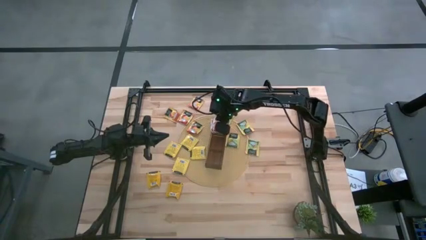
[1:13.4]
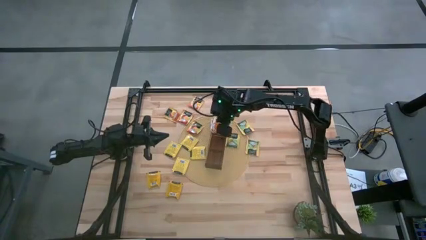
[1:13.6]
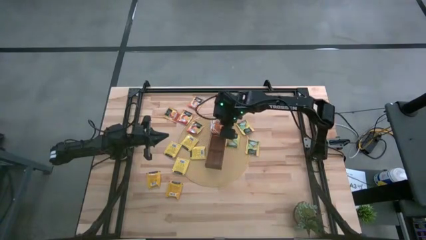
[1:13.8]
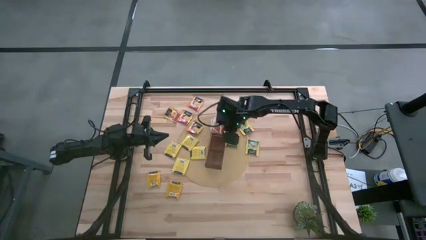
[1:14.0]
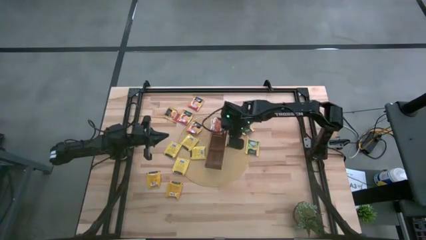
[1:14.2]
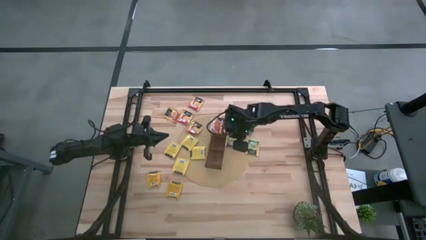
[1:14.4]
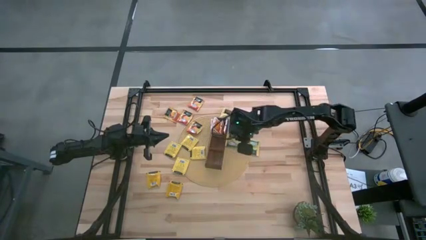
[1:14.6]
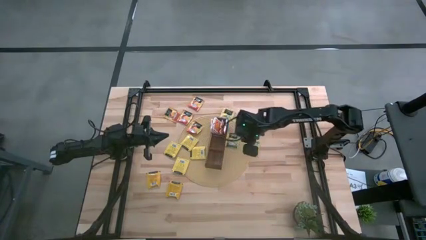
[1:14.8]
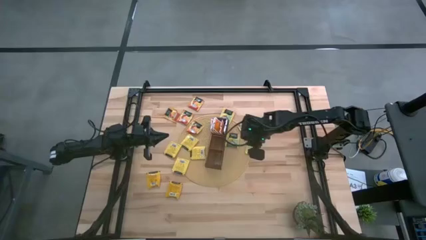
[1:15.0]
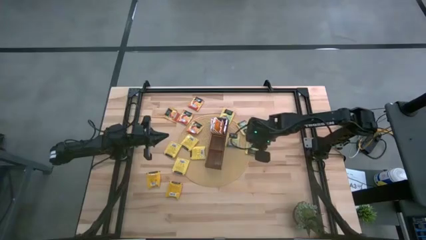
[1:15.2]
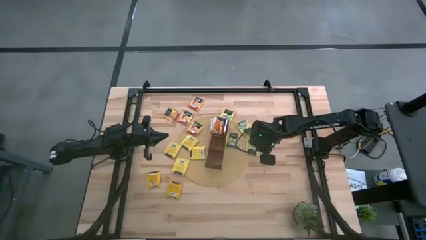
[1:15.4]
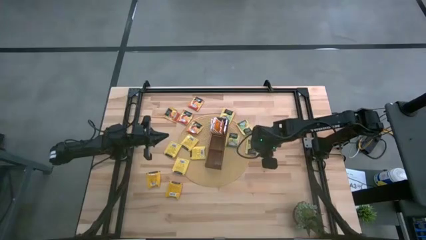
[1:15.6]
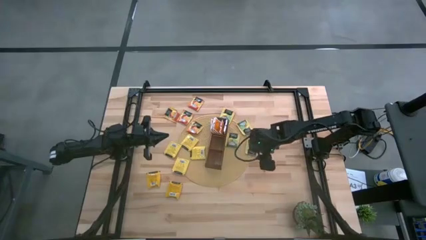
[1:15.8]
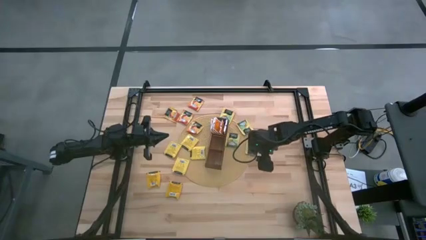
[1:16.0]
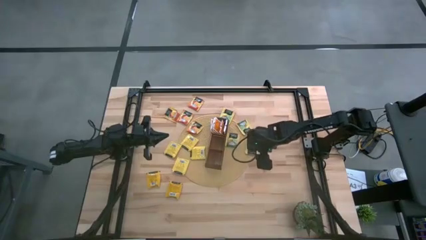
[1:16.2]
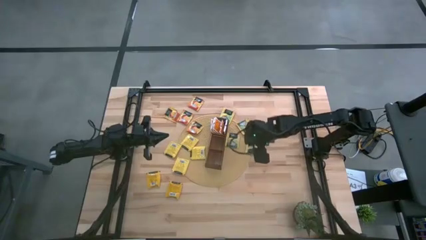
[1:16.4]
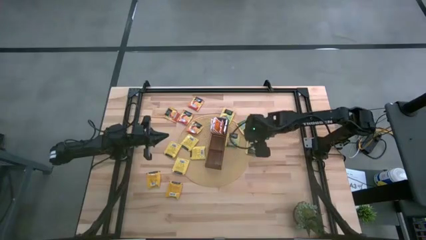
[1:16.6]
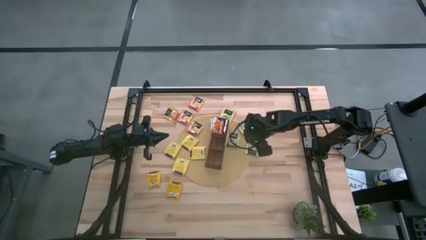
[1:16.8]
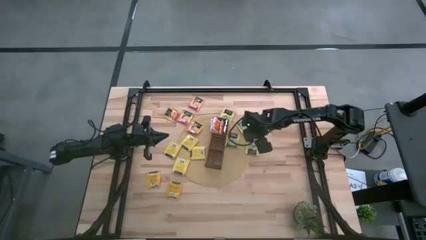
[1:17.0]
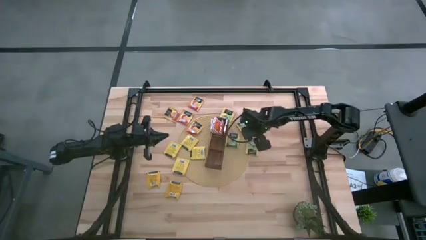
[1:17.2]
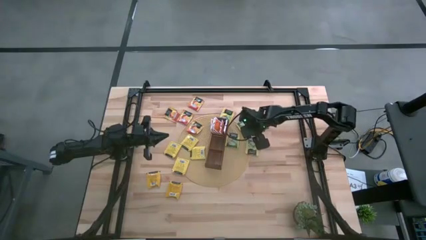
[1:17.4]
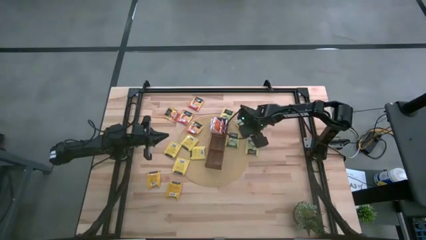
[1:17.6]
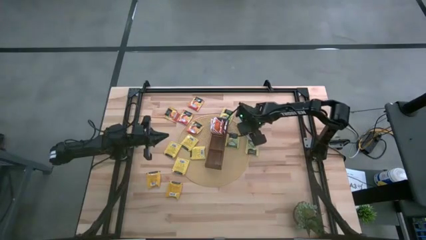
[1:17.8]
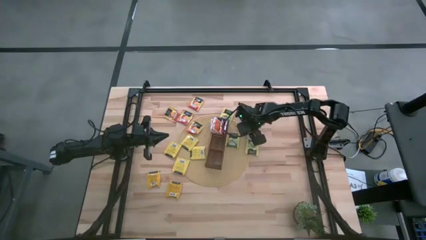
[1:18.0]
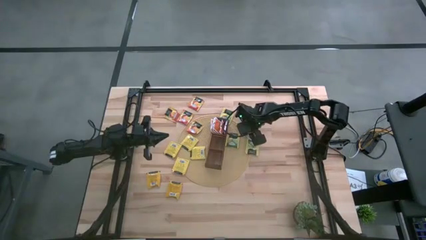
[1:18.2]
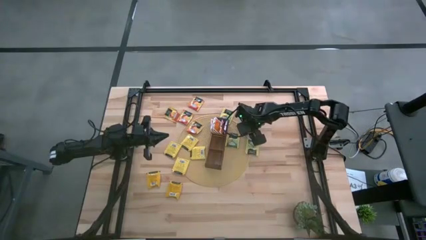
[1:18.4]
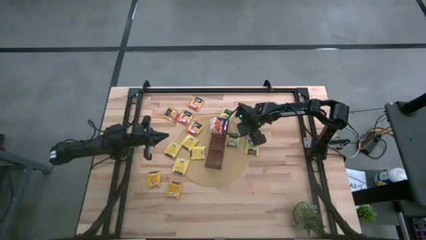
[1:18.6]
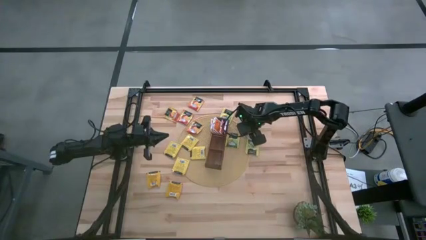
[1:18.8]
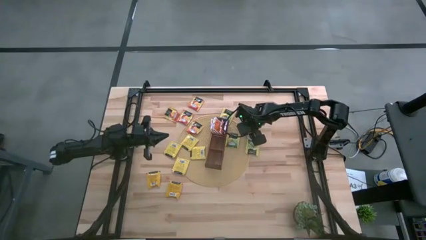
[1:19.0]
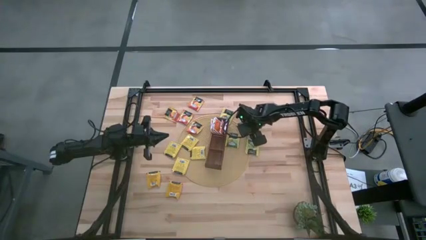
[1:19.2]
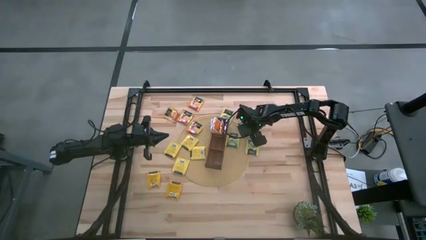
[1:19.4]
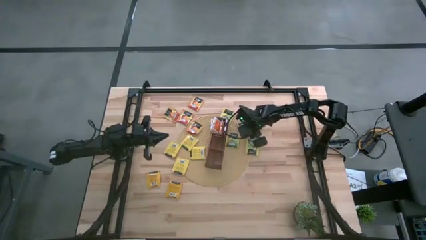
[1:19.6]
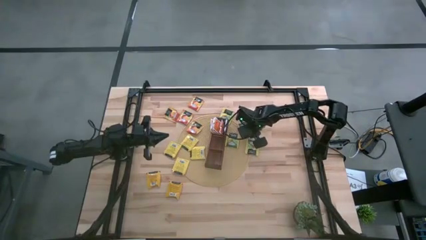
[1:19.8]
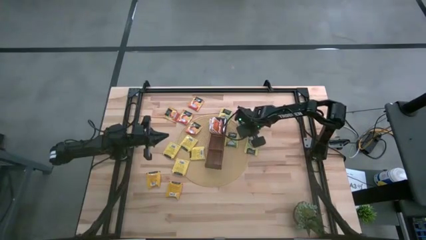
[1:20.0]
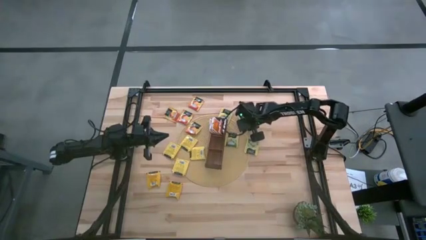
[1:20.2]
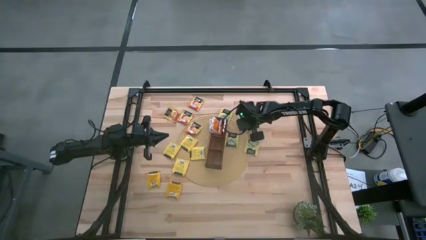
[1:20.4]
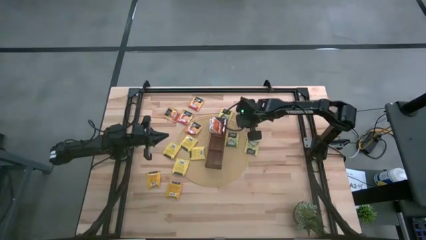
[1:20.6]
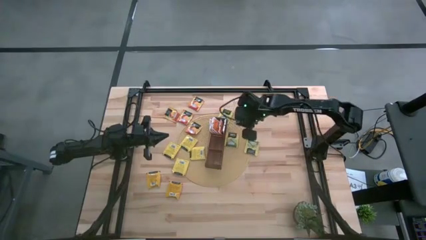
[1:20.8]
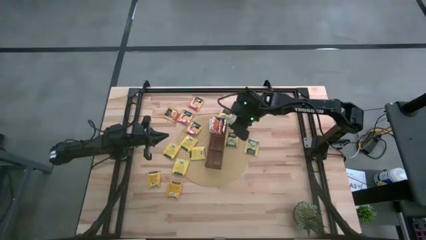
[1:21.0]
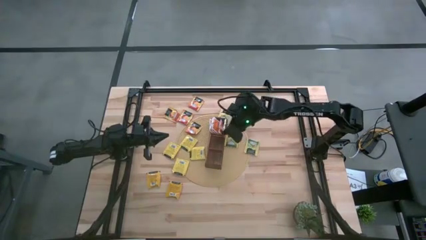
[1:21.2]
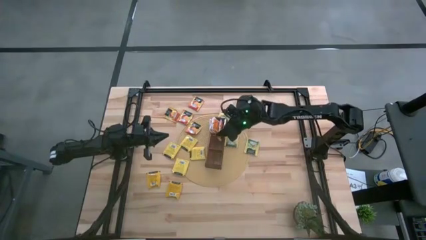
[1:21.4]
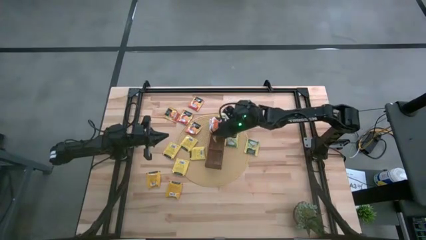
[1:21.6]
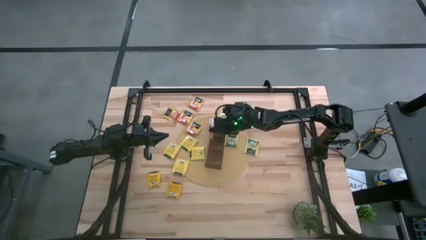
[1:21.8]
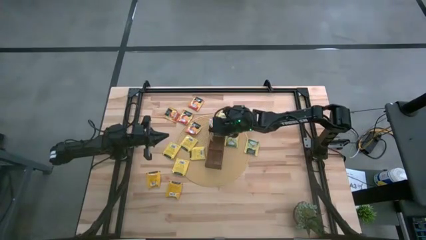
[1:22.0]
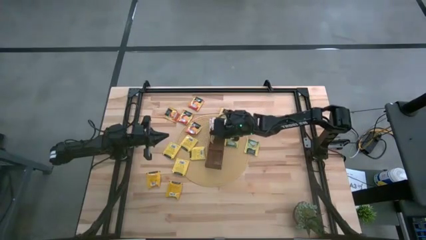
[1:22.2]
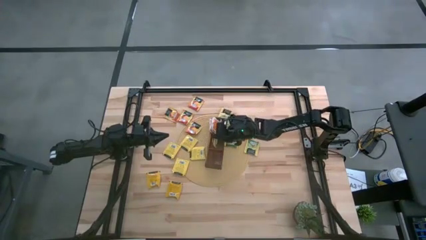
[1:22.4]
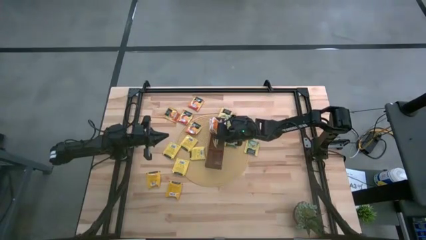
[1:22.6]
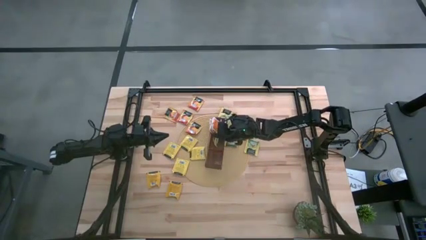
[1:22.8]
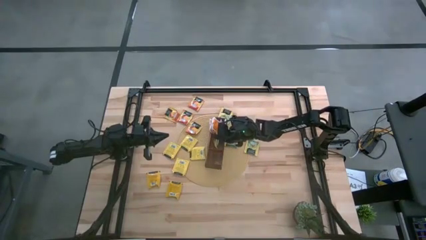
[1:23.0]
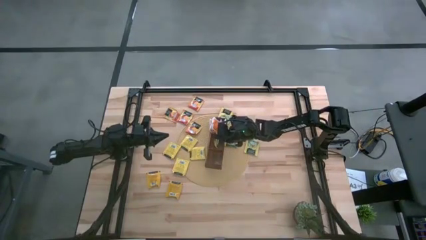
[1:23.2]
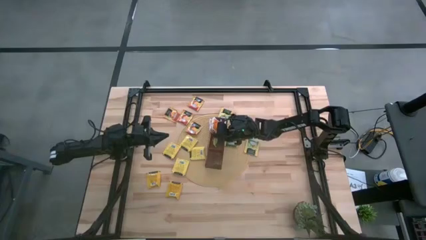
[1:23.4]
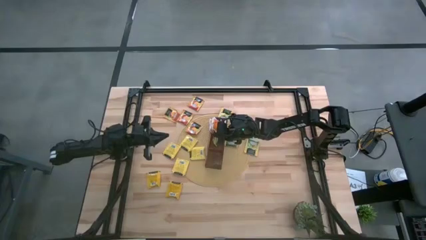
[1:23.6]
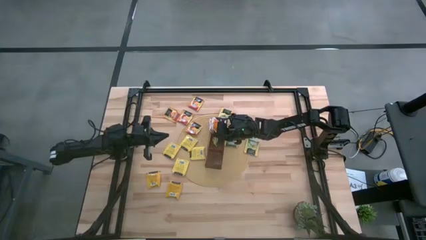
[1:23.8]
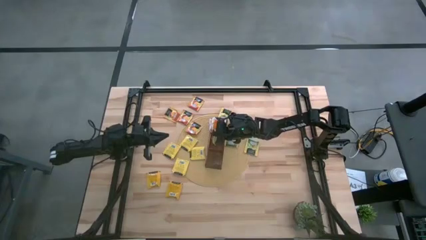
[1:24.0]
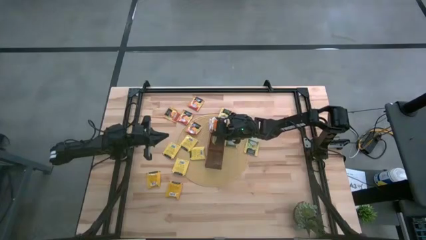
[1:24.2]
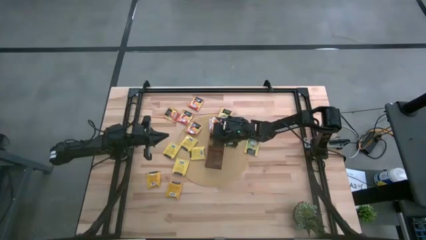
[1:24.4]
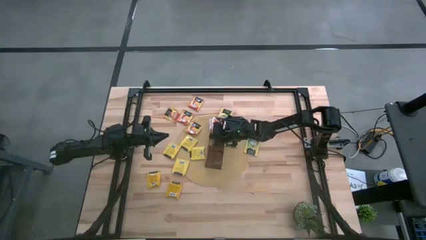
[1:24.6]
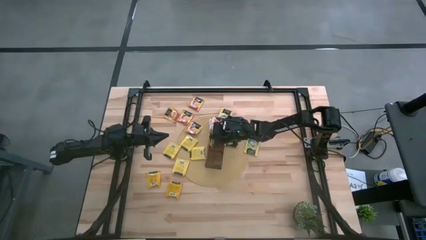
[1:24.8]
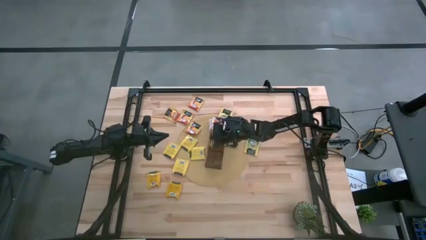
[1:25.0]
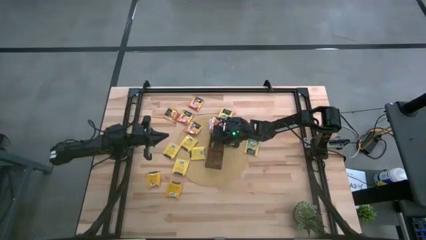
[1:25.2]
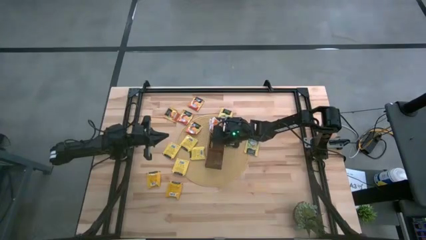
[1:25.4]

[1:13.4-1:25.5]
Task: Pick & Place Tea
Put the yellow tea bag into the middle section of the wooden organizer

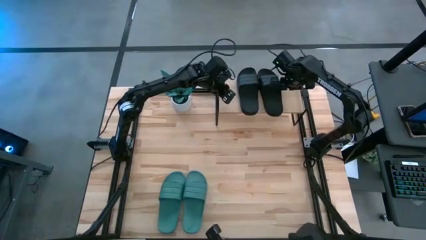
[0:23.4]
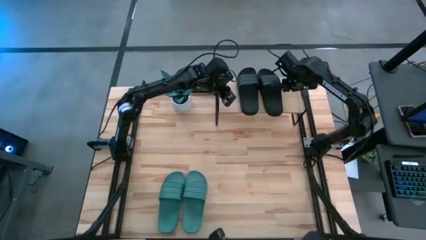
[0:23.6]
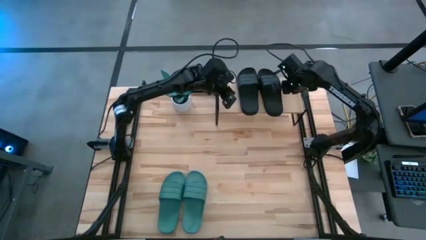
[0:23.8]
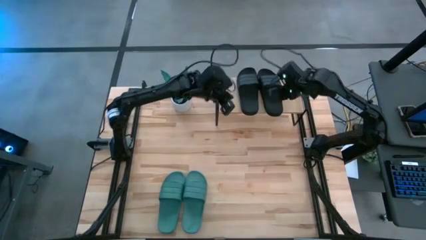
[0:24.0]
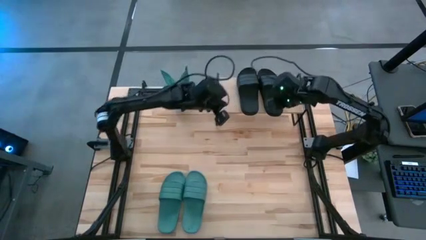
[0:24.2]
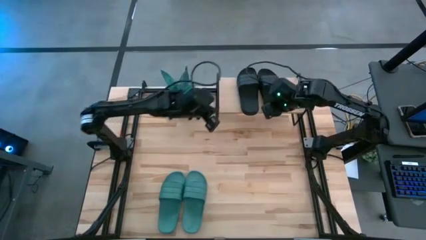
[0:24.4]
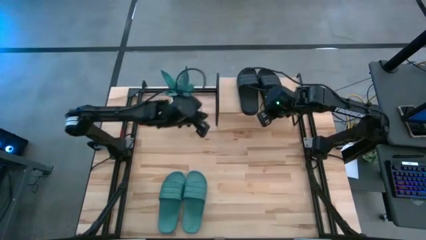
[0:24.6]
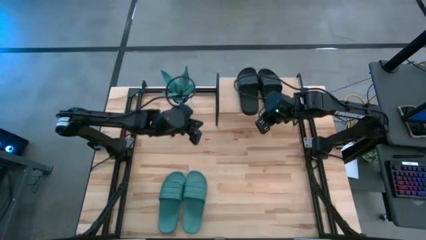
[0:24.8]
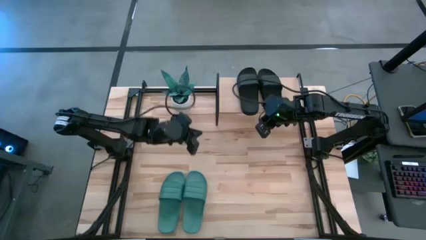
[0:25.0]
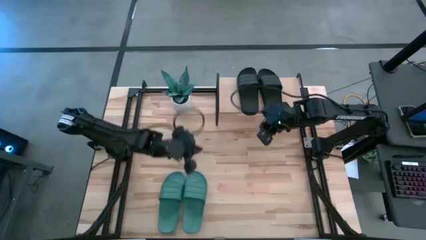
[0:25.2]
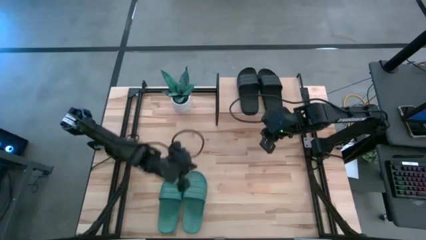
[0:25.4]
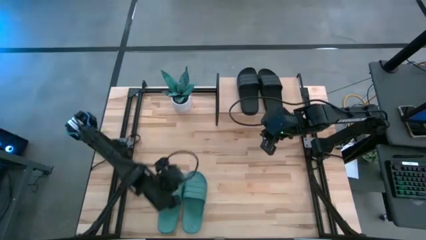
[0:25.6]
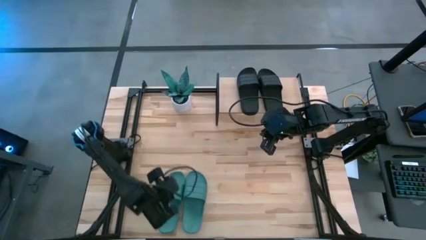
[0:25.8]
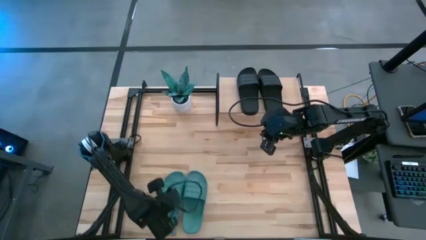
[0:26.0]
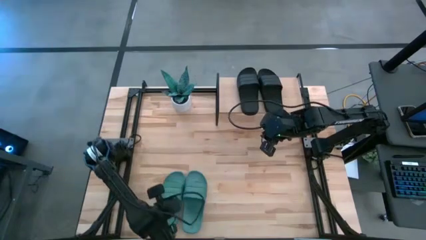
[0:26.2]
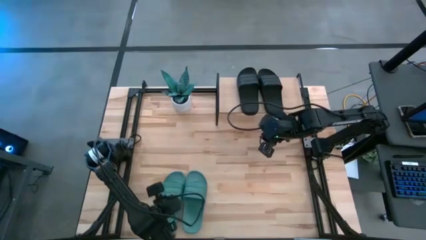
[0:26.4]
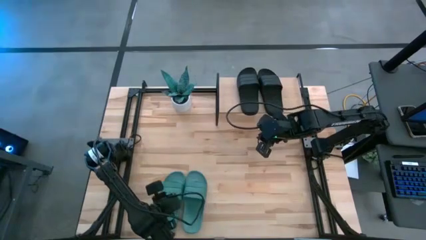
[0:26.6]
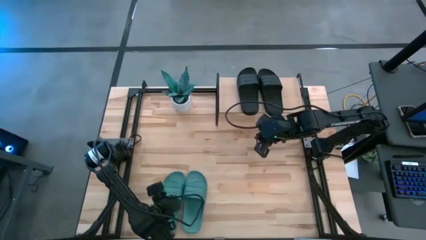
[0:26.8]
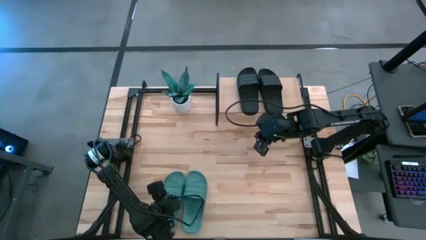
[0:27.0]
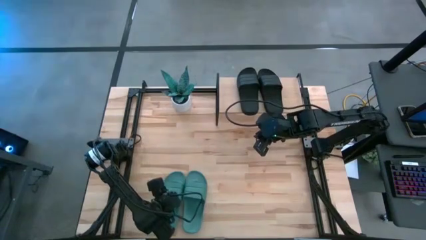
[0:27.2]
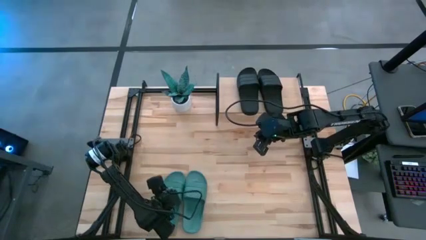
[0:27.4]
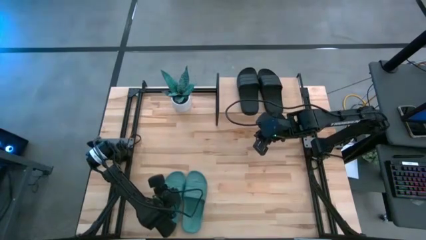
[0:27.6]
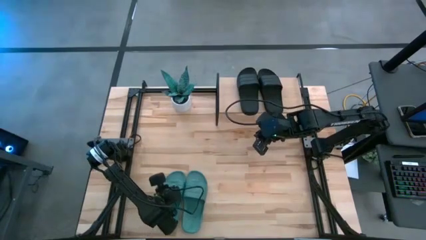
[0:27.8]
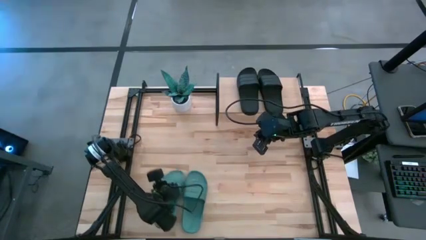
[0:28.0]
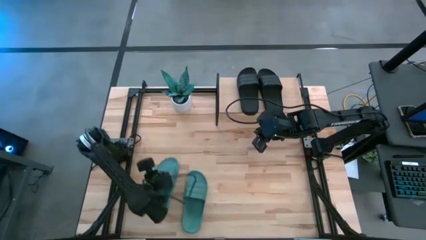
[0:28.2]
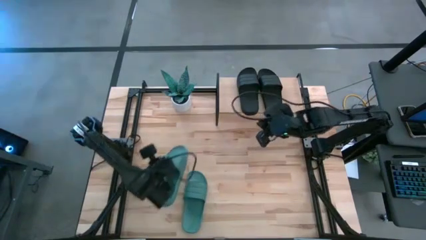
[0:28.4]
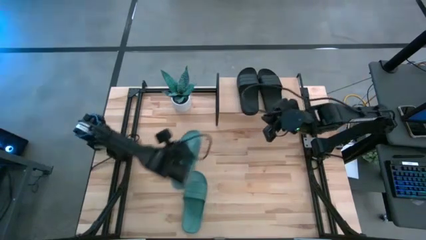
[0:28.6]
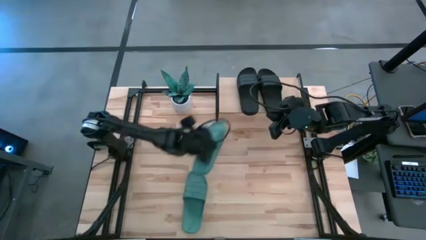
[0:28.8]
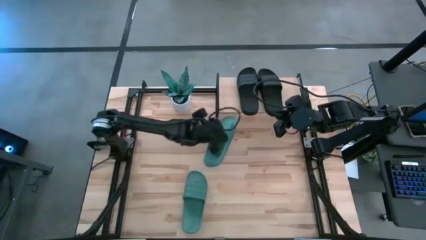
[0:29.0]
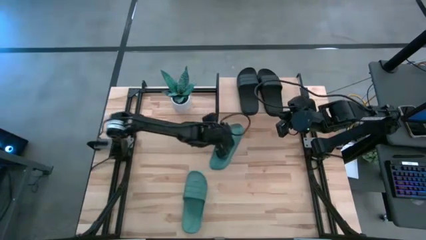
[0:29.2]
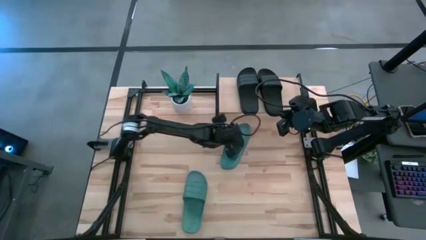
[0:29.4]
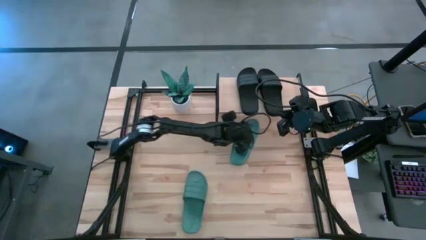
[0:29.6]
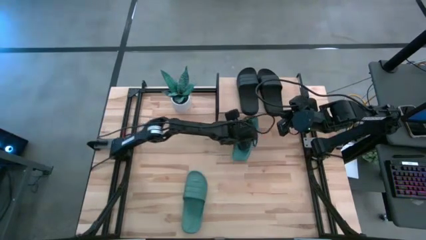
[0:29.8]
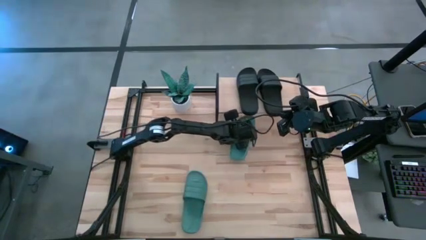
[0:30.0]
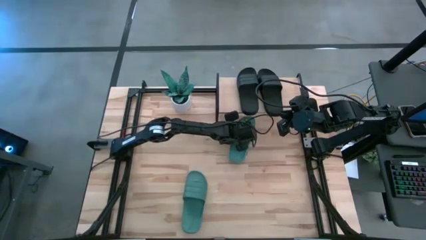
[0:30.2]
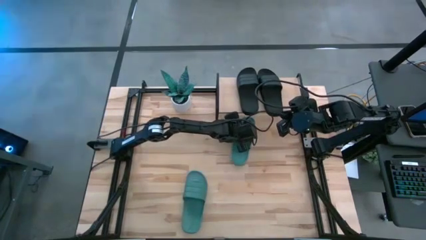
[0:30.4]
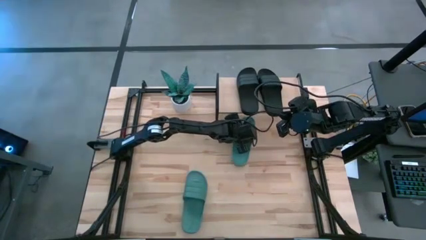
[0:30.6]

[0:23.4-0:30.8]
Task: Pick and place slides into the shelf
Move the left green slipper to the middle of the table
